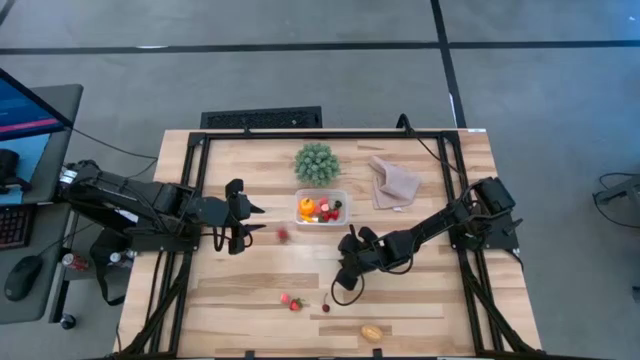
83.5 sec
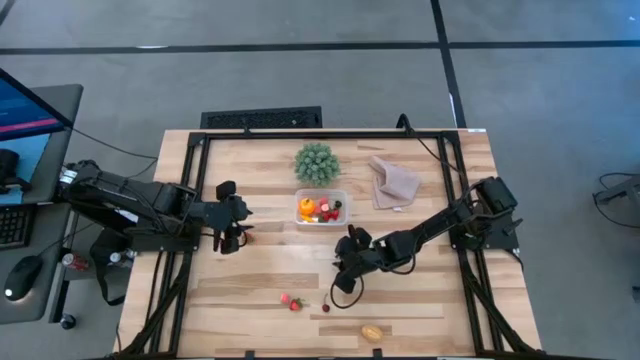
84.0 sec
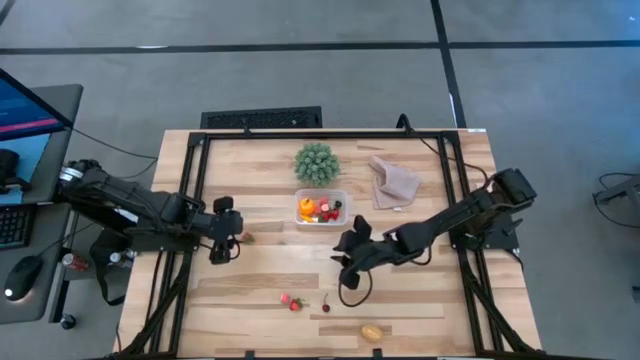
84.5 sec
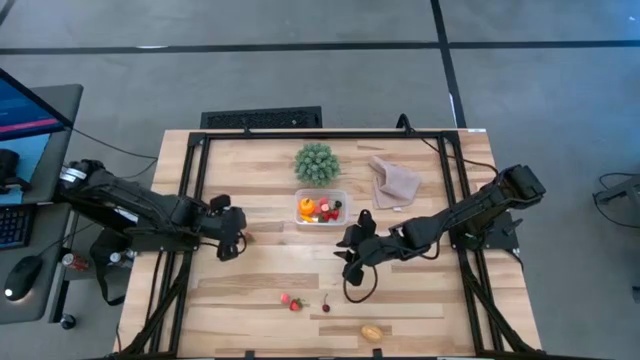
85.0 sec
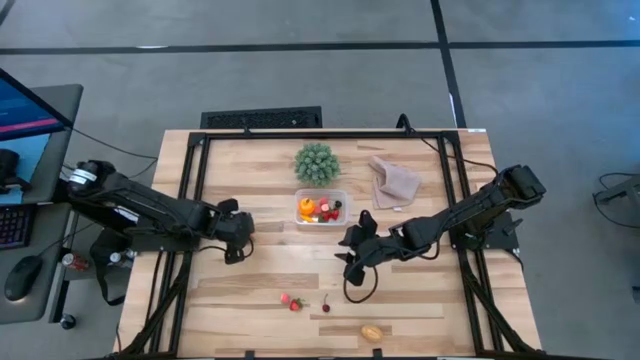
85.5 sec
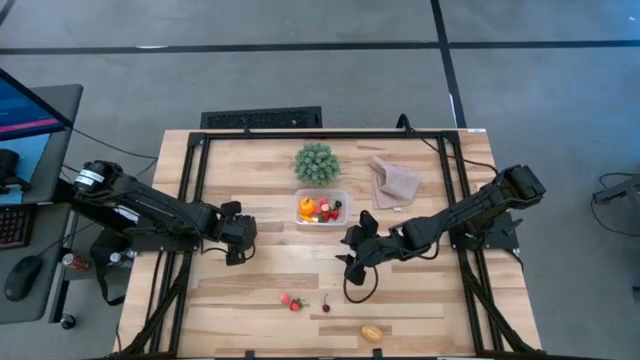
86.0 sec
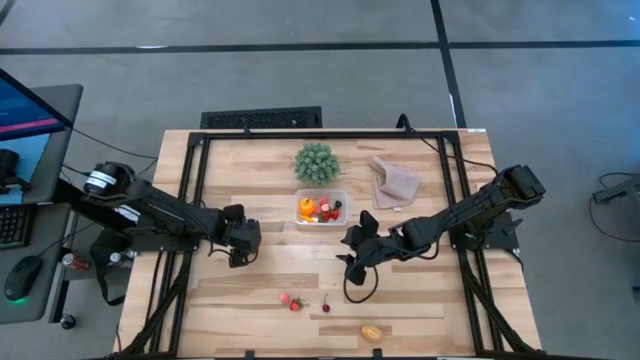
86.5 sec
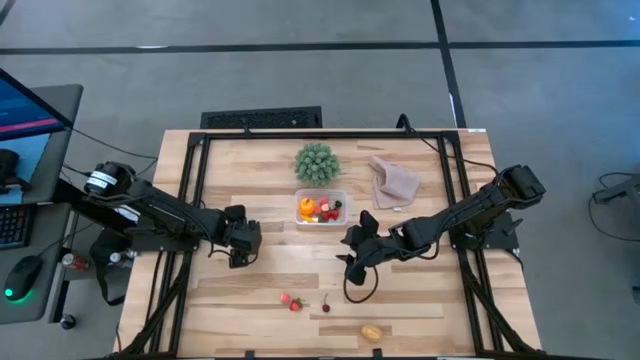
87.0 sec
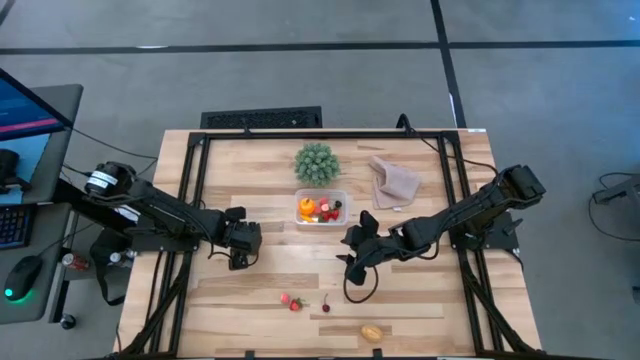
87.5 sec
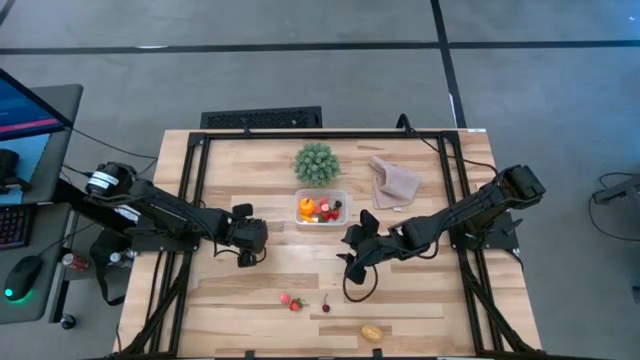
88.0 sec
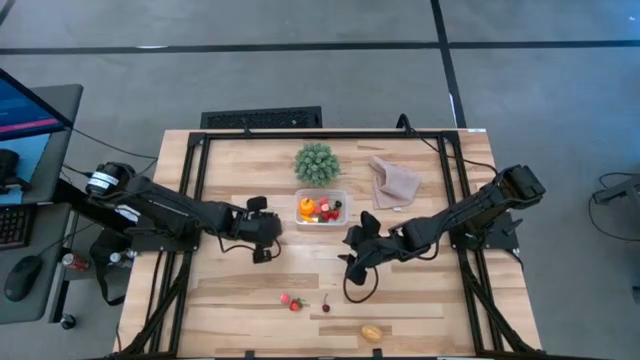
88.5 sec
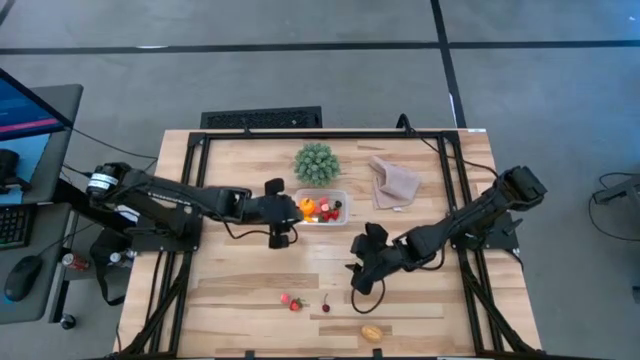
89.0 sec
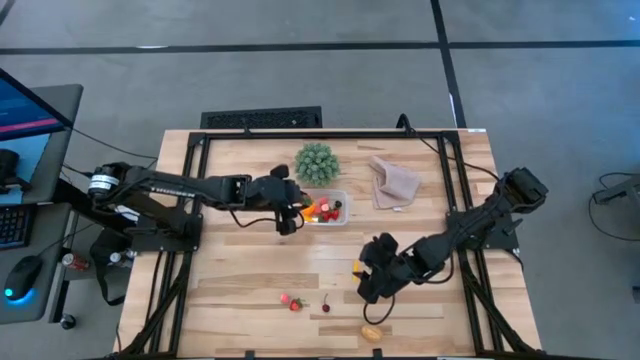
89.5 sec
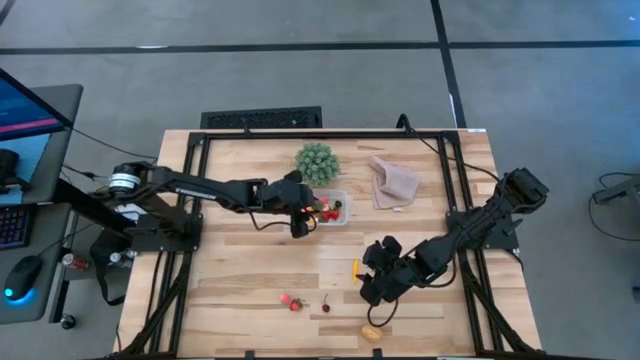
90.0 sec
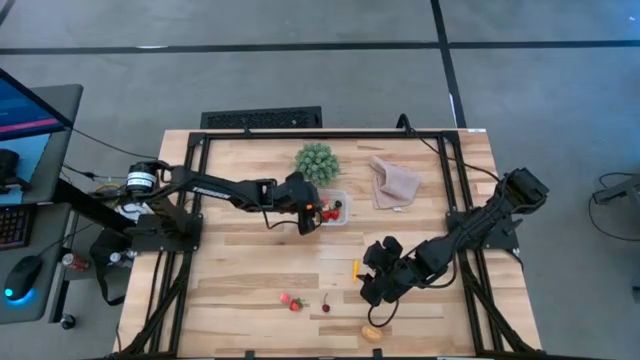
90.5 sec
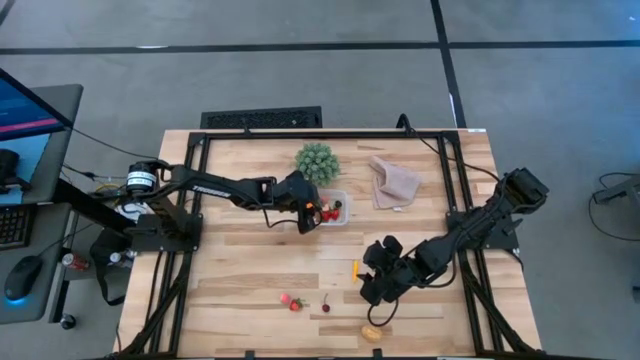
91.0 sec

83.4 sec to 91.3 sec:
Task: Pick and placing Produce into tupperware
Put the red strawberry into the transparent container

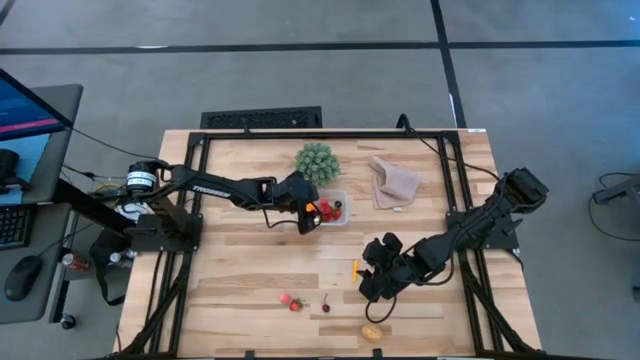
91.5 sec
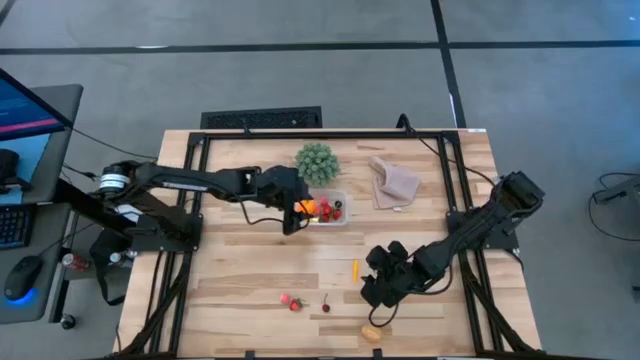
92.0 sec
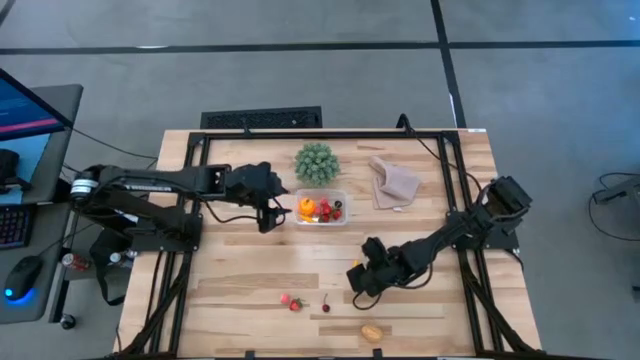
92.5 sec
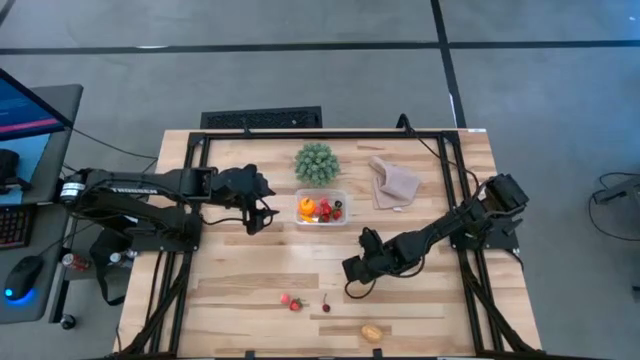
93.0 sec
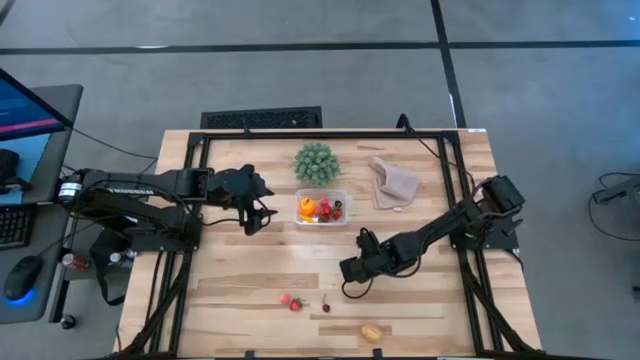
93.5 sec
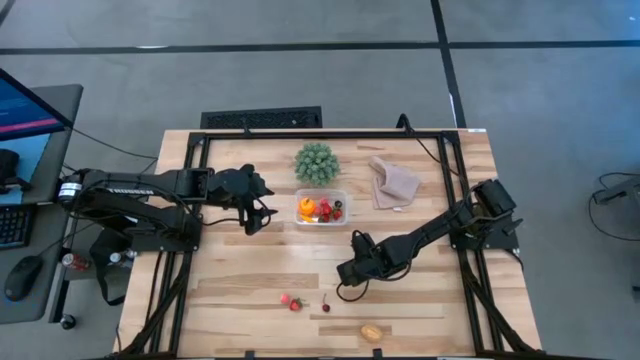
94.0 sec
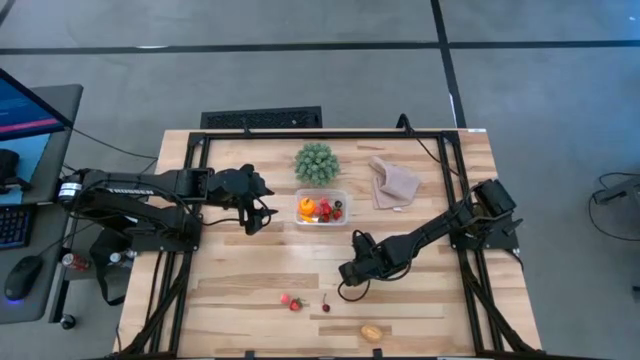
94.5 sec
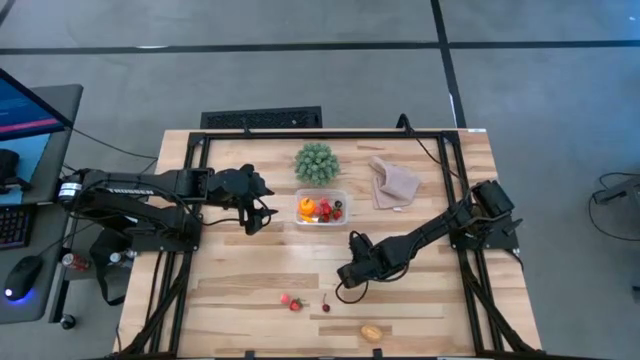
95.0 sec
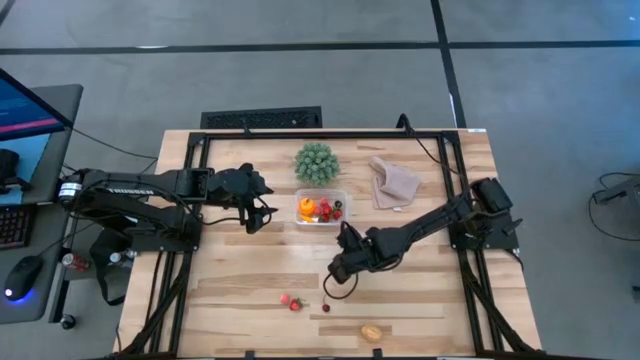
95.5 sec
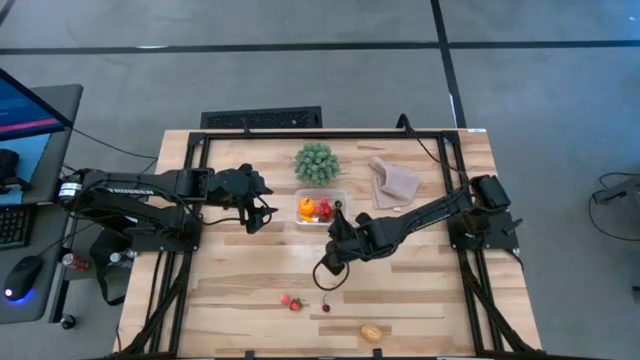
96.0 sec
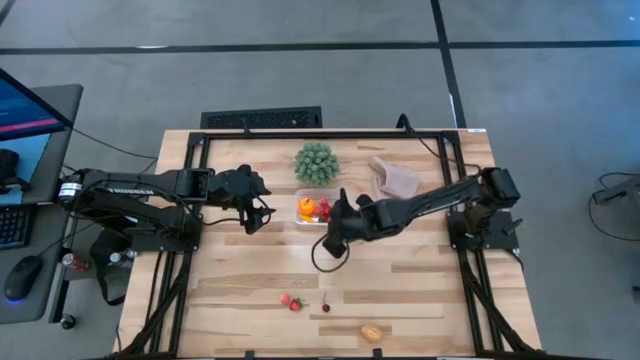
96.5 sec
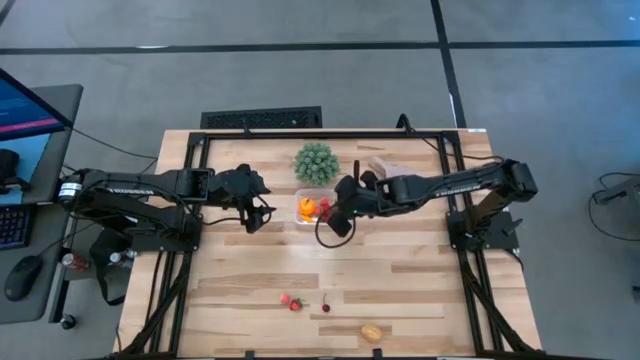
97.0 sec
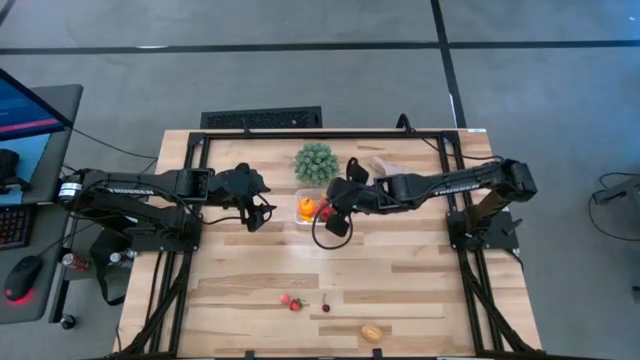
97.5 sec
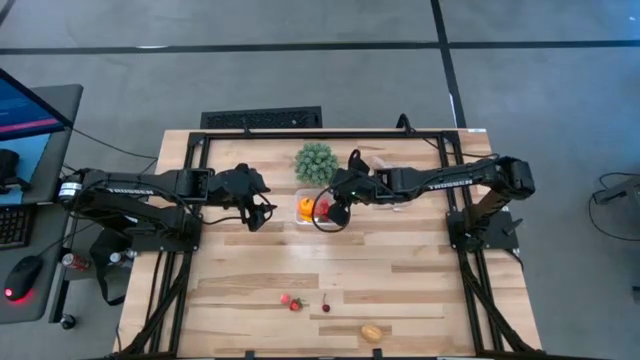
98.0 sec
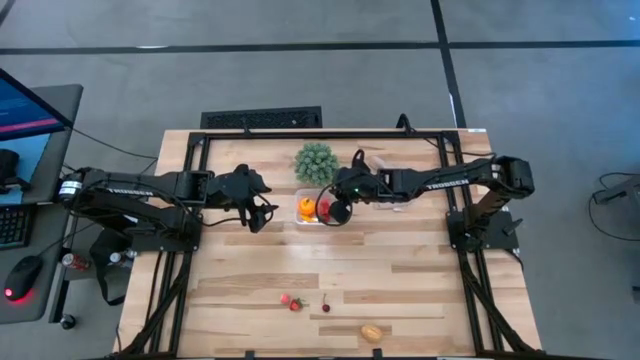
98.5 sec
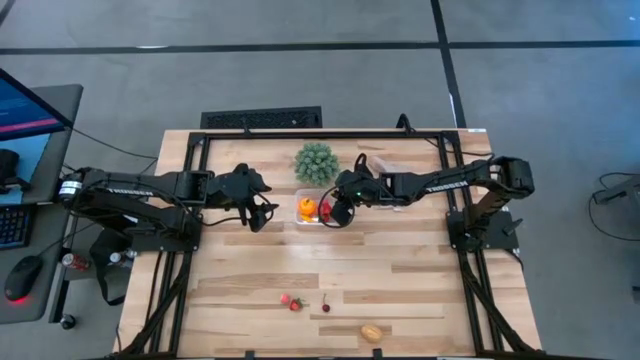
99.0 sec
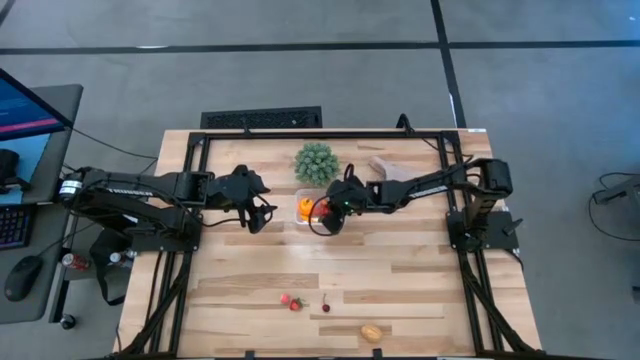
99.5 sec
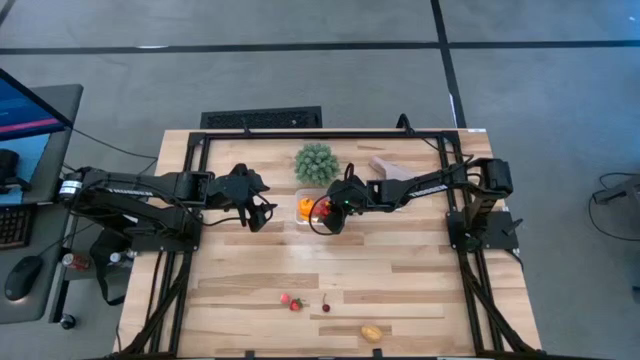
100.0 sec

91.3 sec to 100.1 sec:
Put the yellow corn into the transparent container

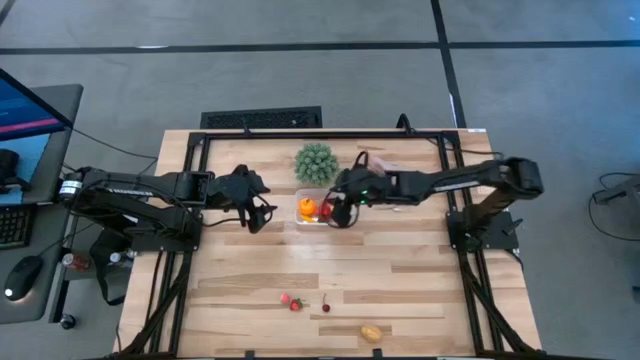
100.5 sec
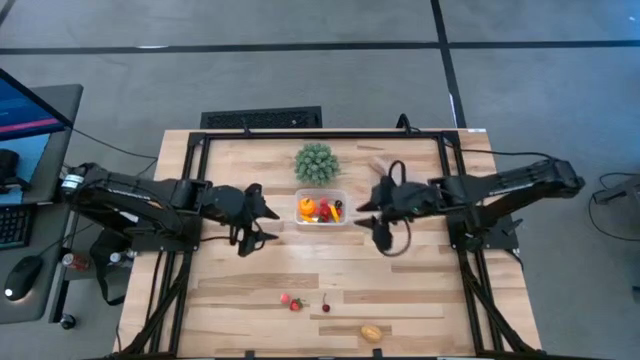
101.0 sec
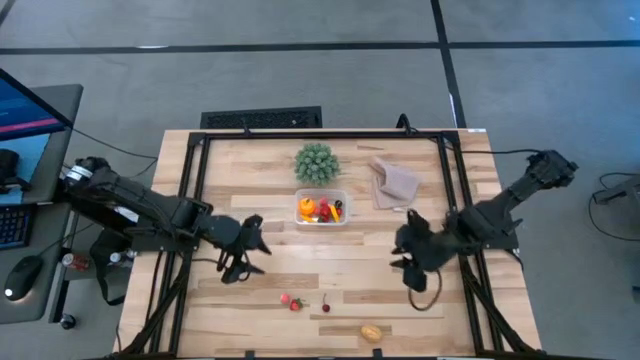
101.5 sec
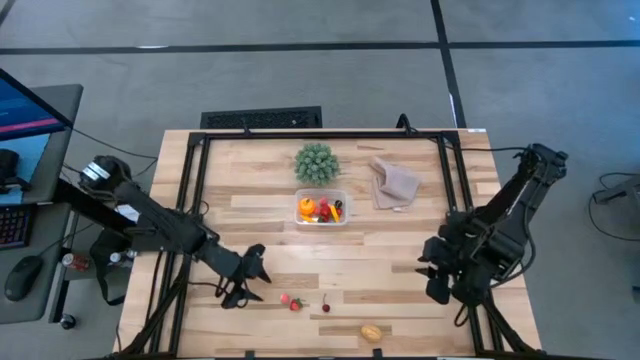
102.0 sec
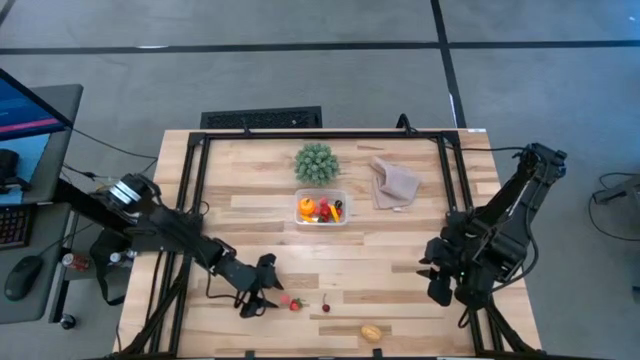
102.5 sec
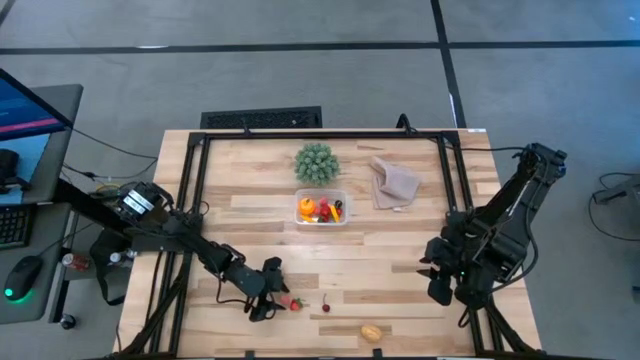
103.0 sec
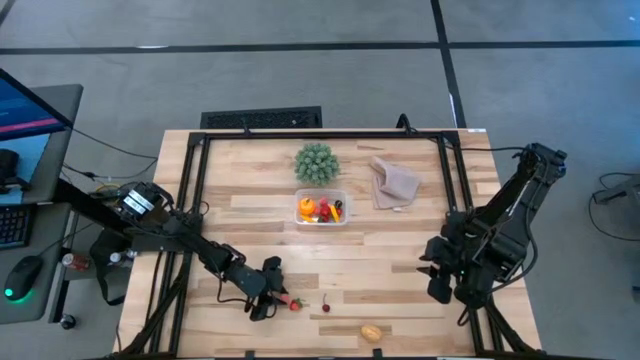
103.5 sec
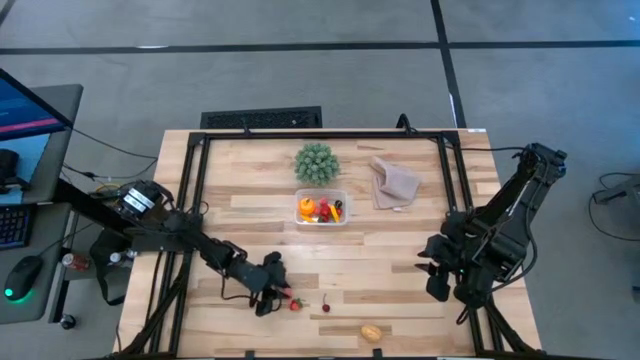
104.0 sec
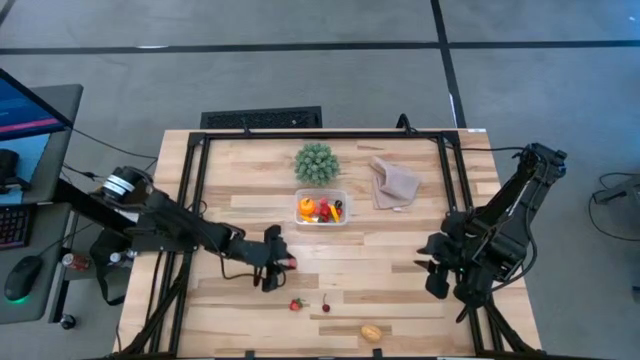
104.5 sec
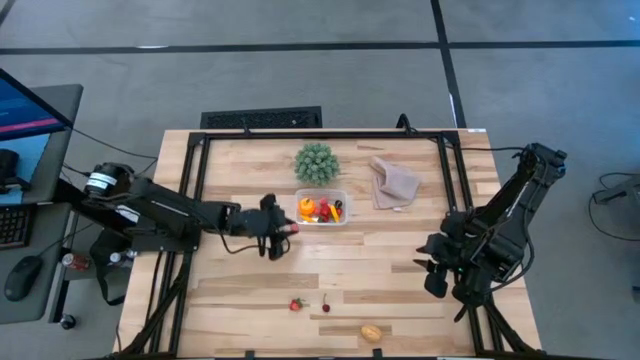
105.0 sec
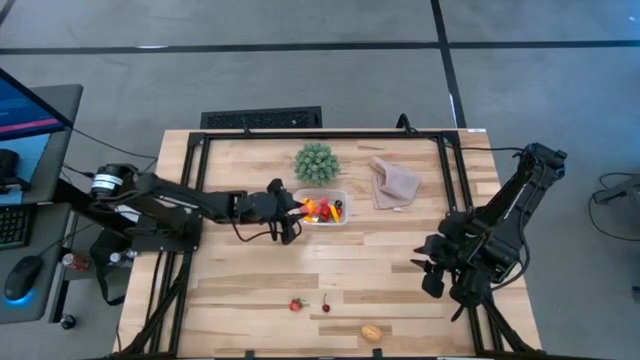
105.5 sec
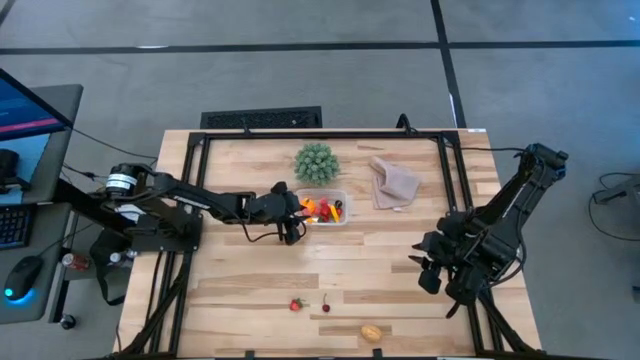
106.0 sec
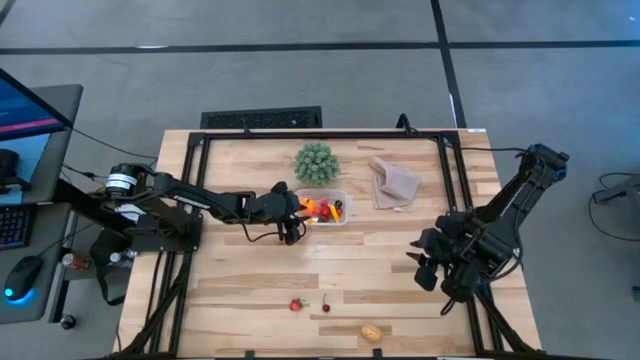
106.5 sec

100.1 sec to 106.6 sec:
Put the pink peach into the transparent container
